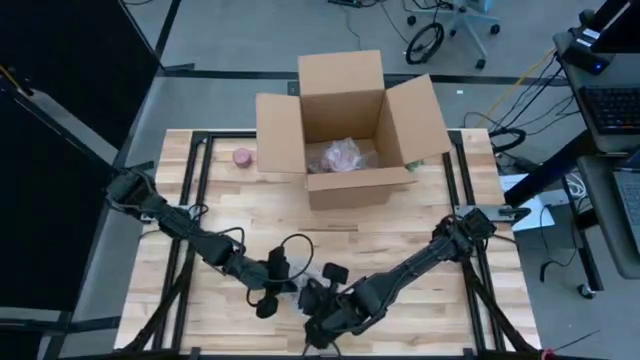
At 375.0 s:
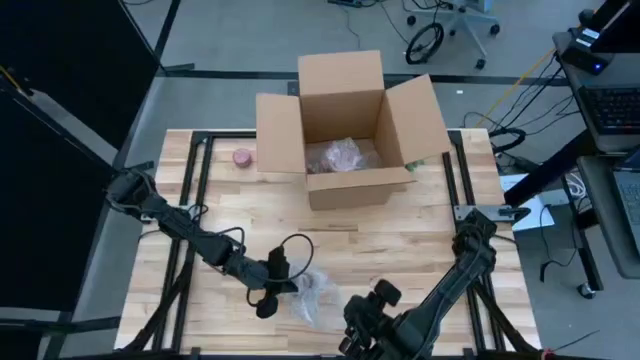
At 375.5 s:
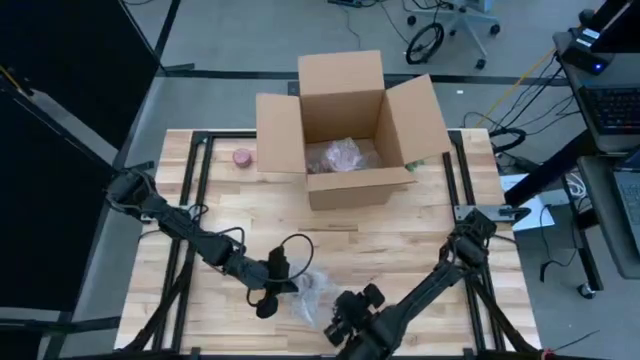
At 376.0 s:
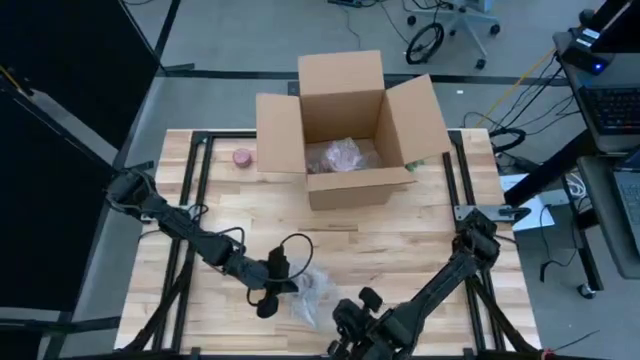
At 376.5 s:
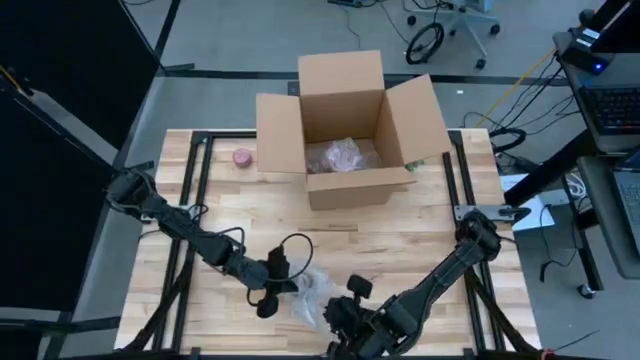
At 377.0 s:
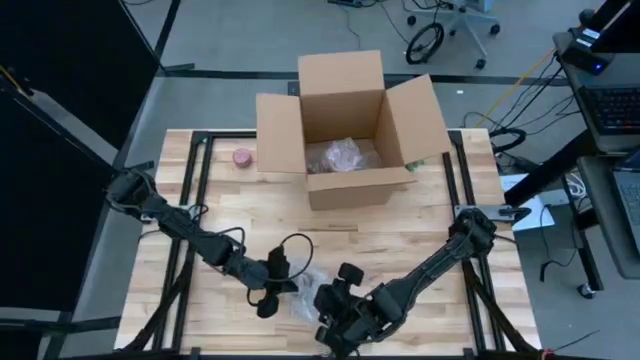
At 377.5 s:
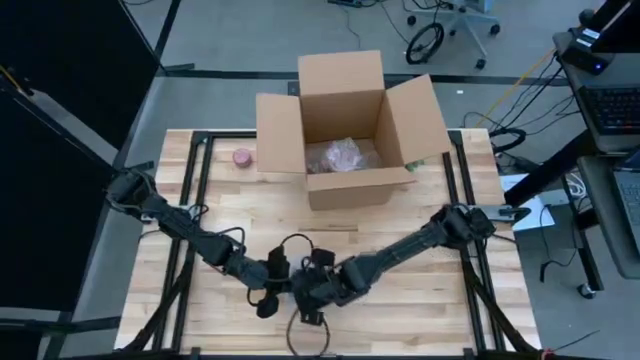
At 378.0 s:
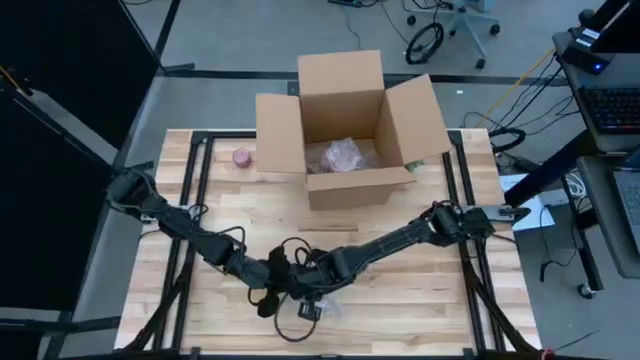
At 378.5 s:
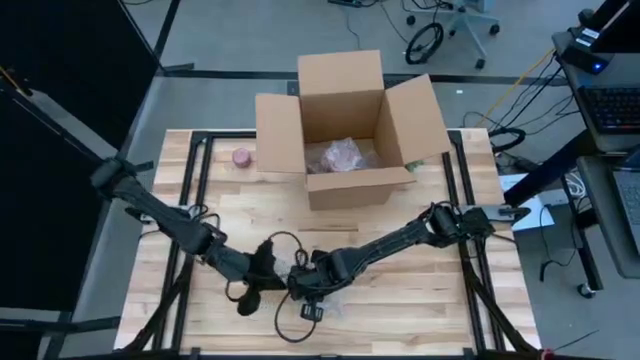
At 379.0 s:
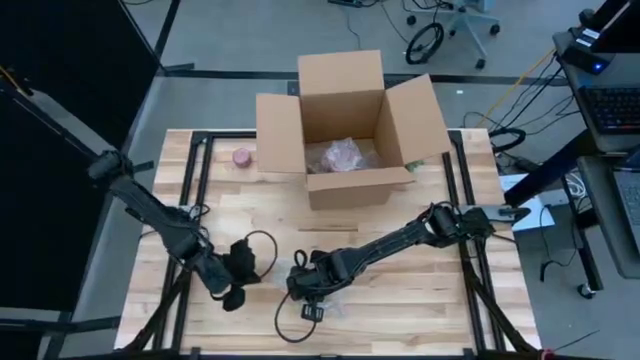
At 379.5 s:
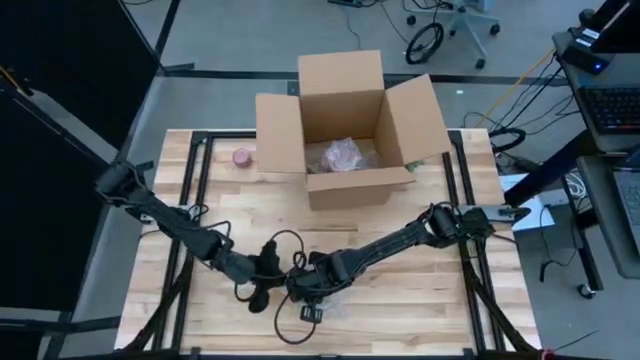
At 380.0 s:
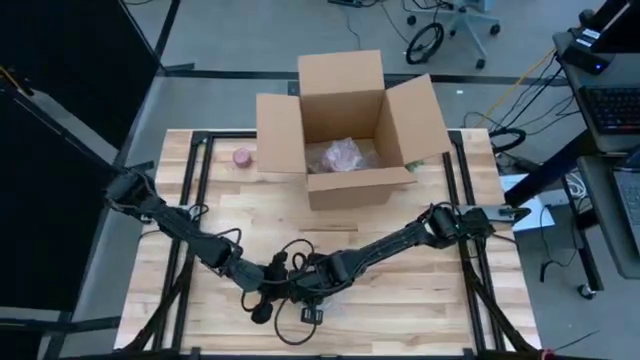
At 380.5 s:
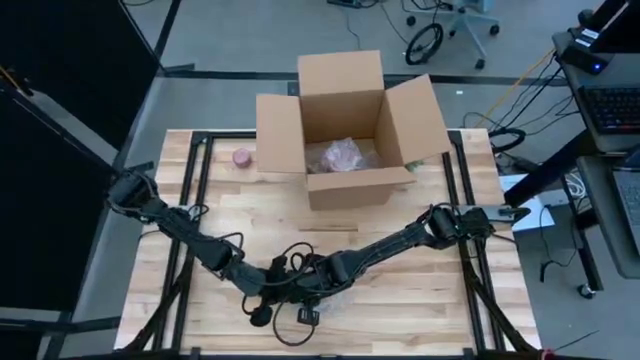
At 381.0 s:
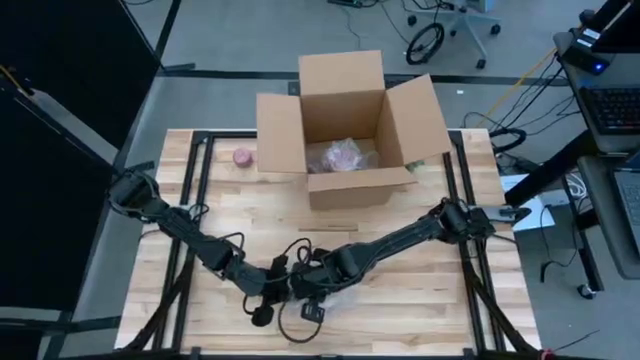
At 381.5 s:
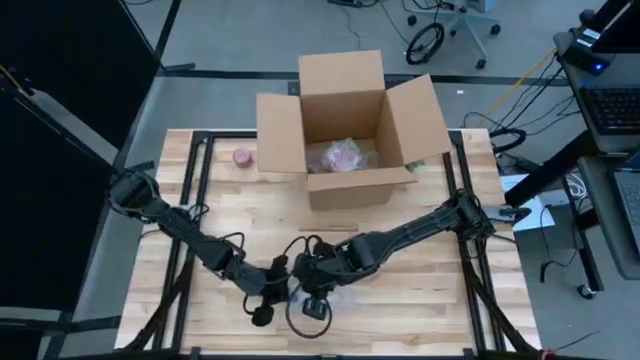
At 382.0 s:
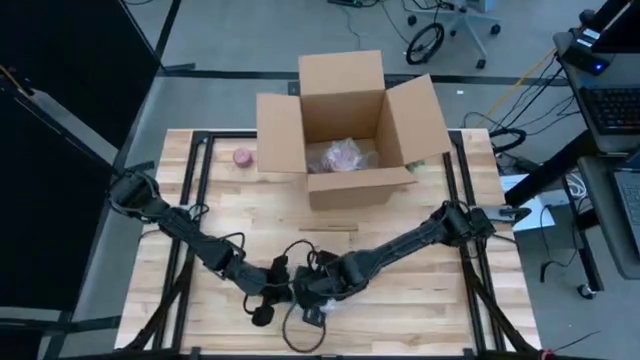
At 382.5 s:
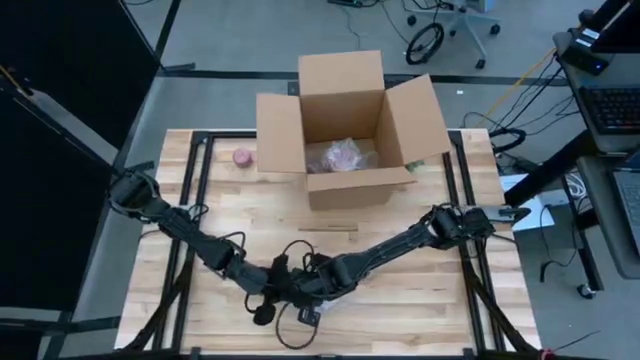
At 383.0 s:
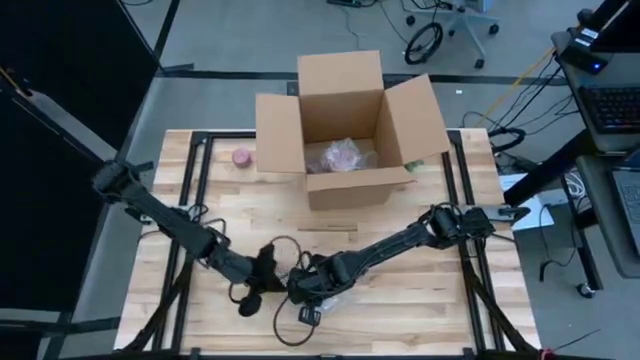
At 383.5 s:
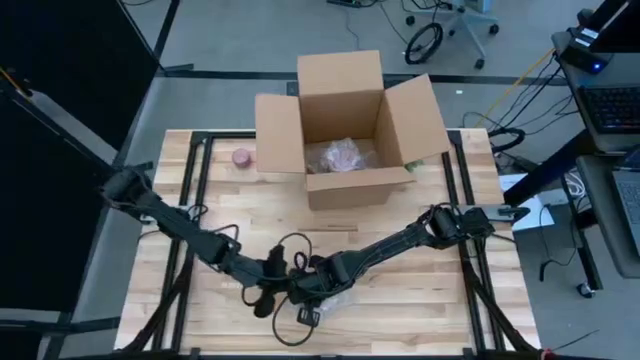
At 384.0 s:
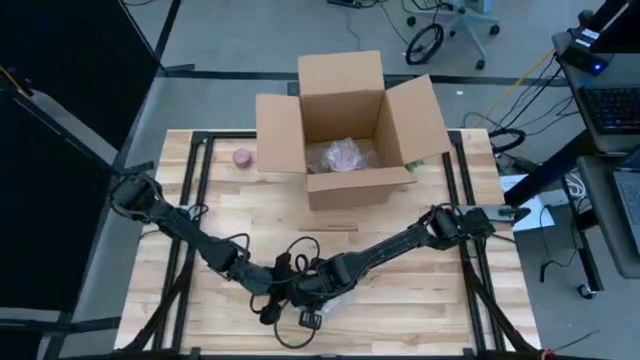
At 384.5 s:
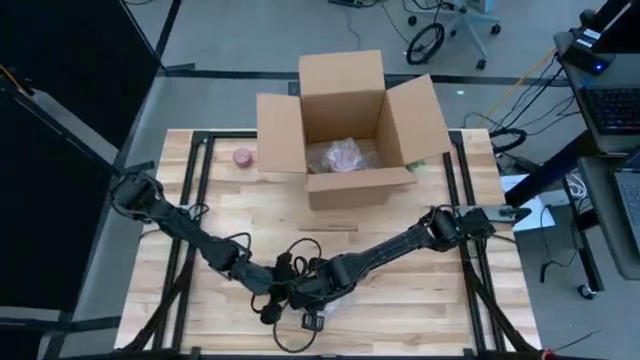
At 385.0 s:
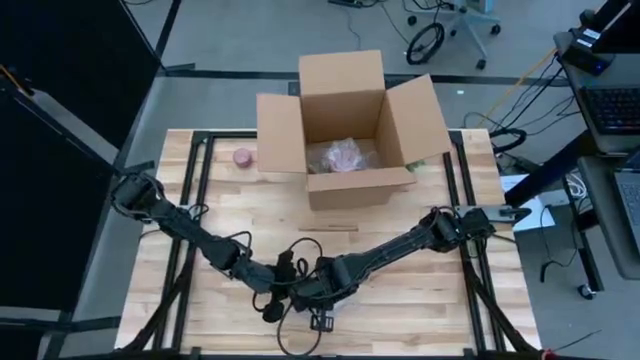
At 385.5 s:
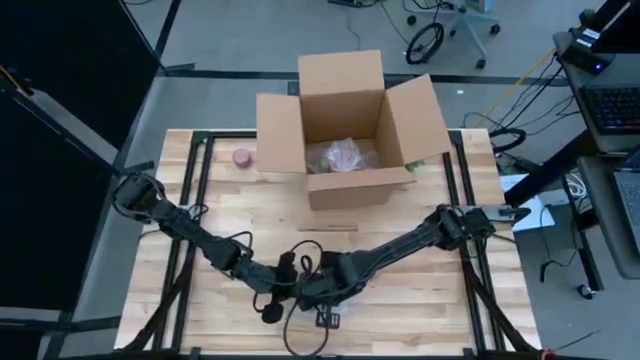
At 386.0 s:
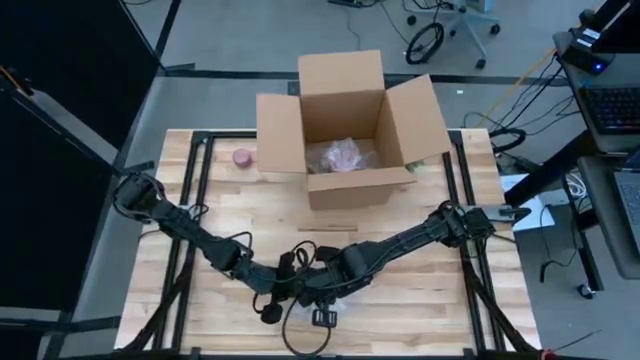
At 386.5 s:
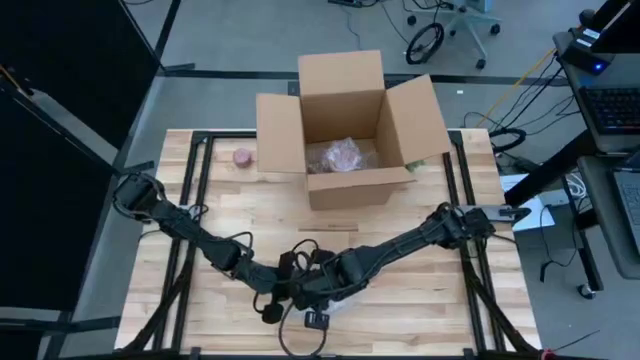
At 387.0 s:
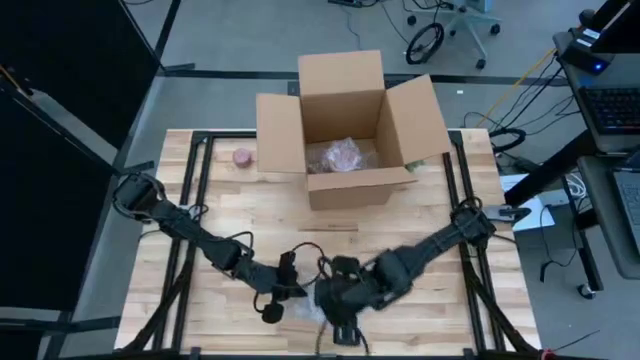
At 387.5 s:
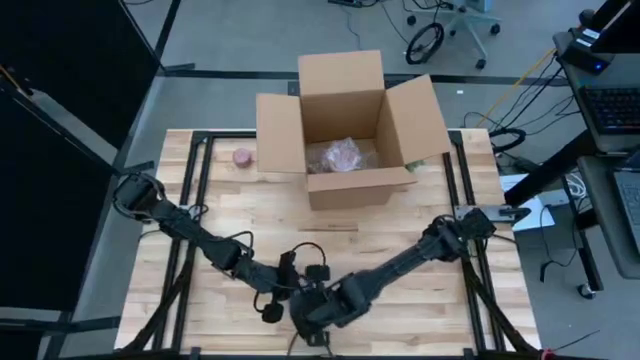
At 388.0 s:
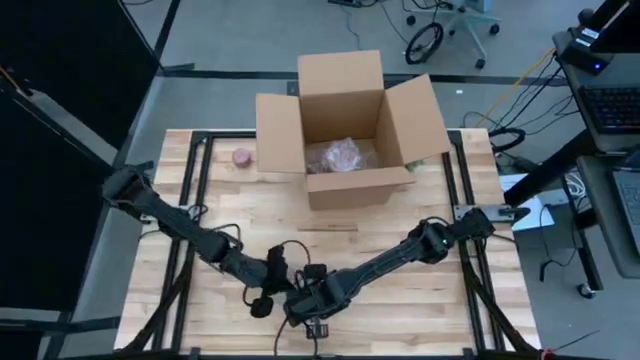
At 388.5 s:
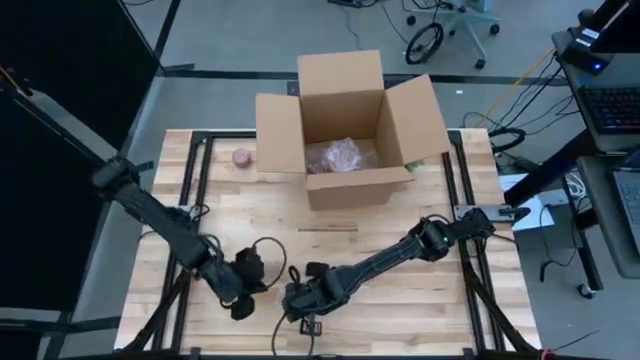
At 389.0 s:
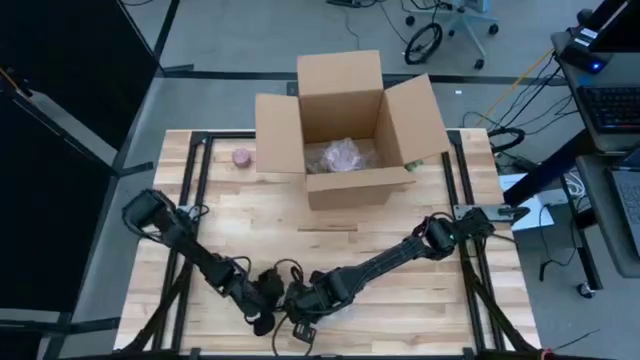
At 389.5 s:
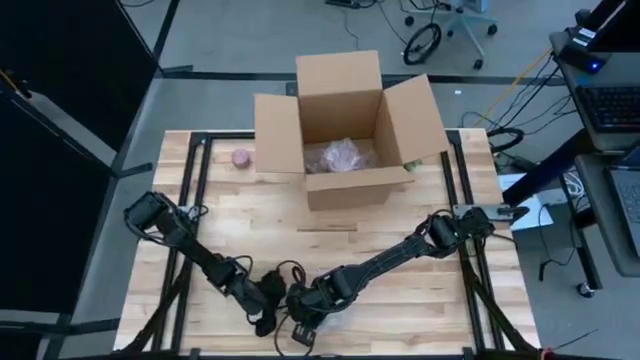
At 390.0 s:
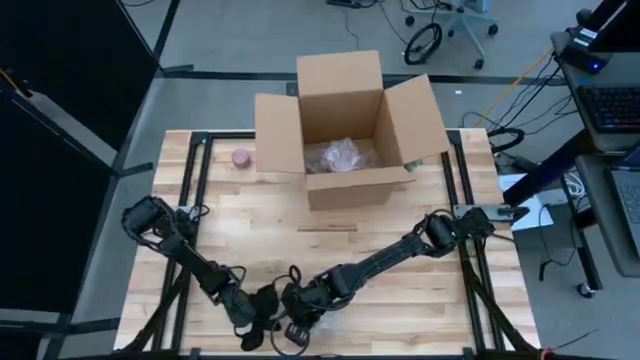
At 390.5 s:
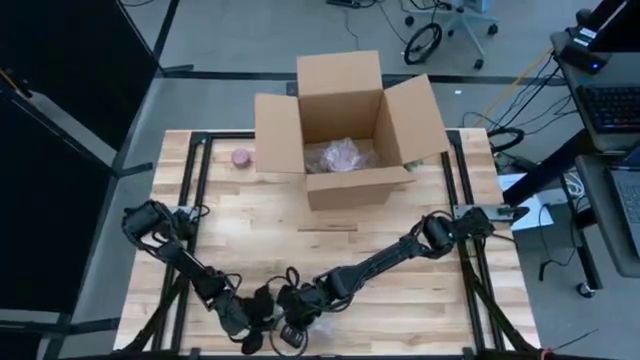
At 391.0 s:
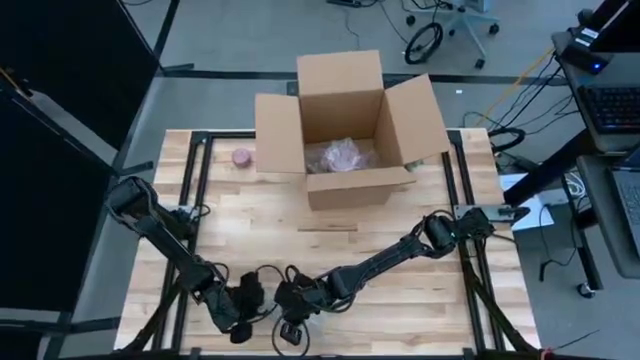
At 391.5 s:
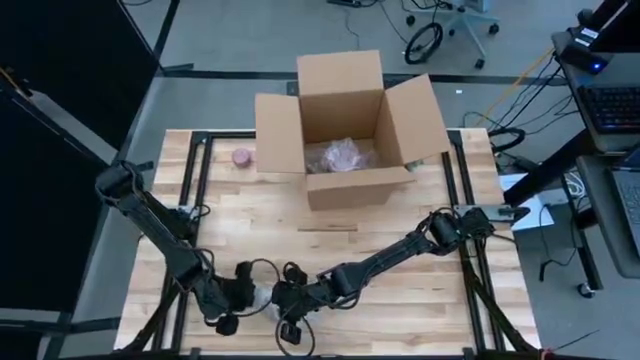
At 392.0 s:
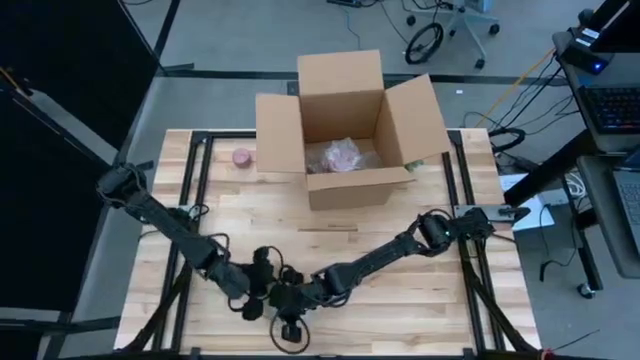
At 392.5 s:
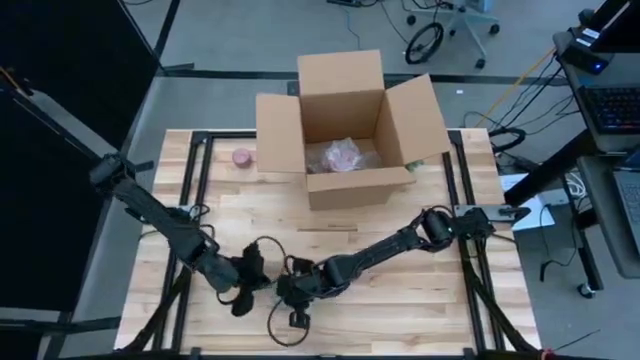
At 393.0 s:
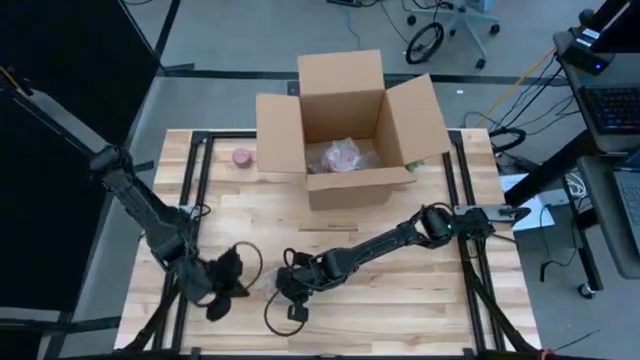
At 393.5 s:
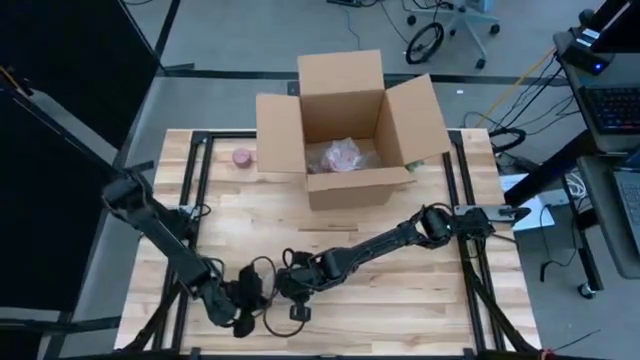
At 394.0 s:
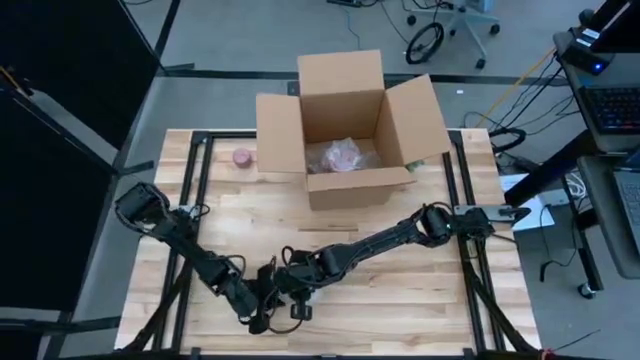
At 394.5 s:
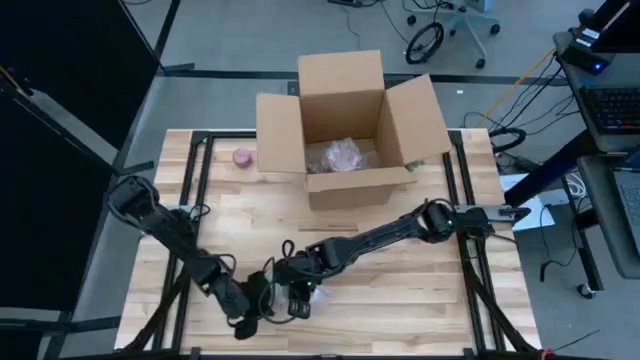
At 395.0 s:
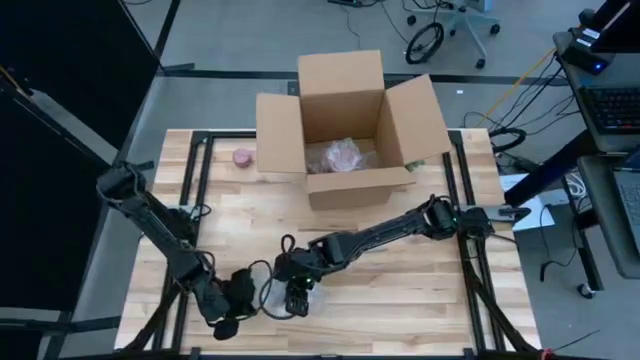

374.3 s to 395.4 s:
Task: wrap mug
Wrap the orange cup with the bubble wrap
